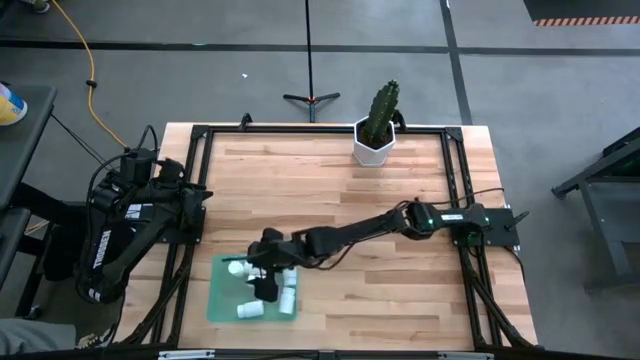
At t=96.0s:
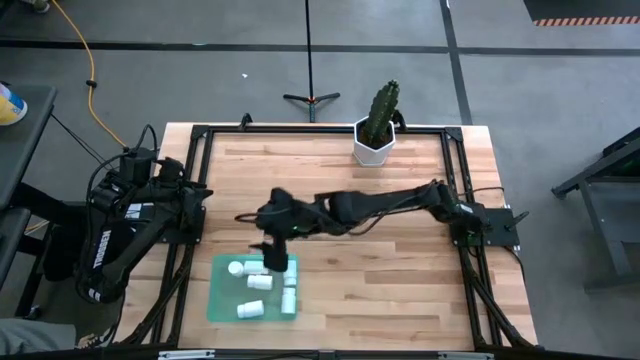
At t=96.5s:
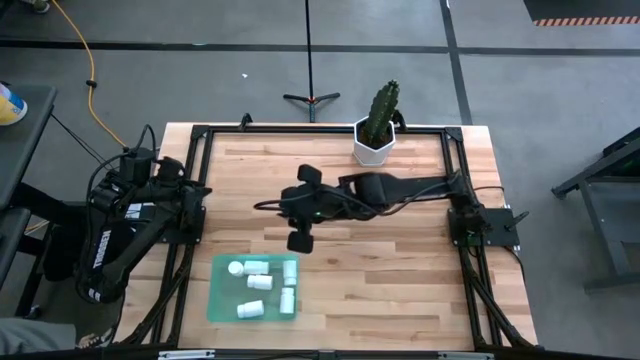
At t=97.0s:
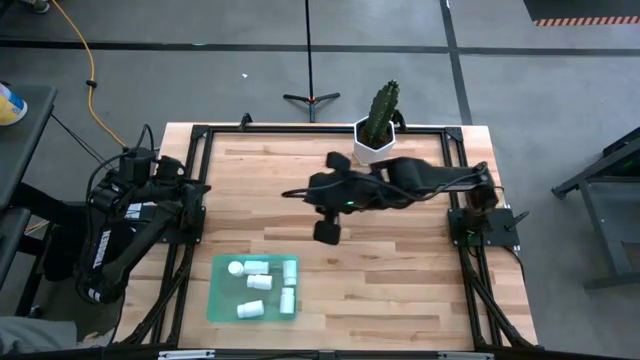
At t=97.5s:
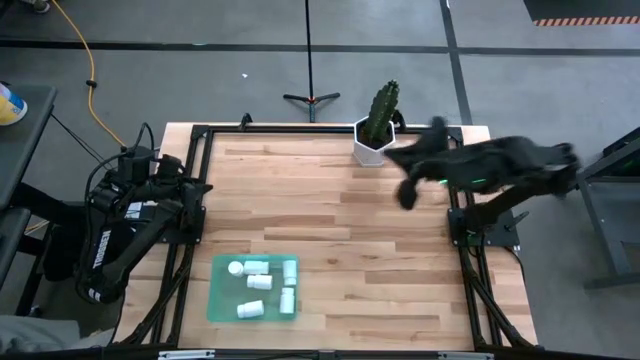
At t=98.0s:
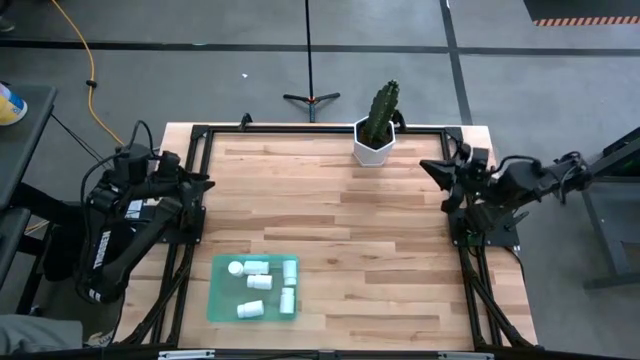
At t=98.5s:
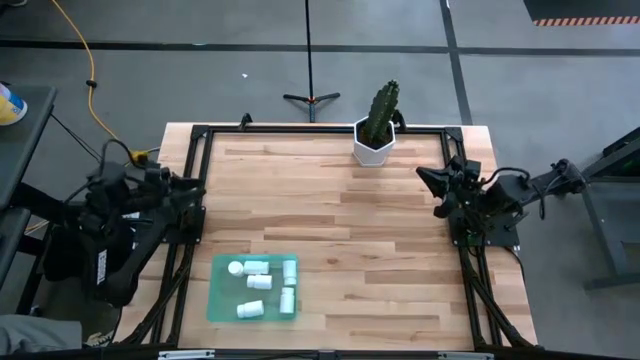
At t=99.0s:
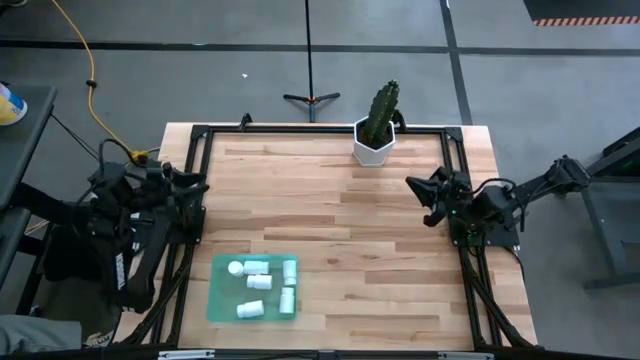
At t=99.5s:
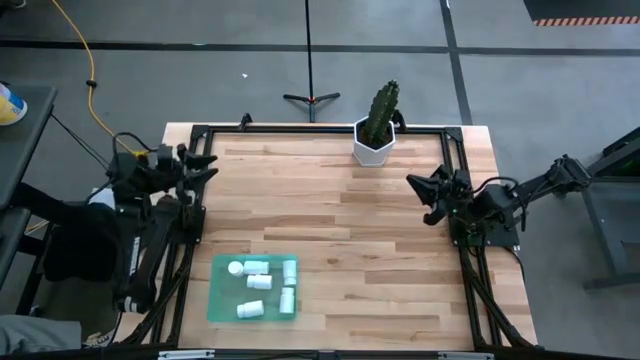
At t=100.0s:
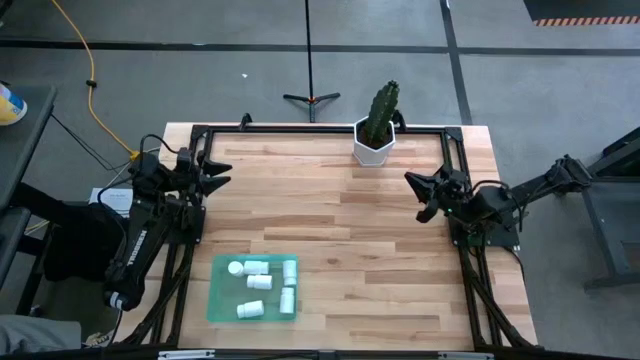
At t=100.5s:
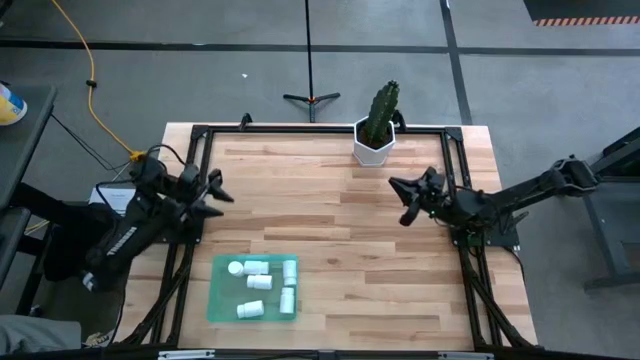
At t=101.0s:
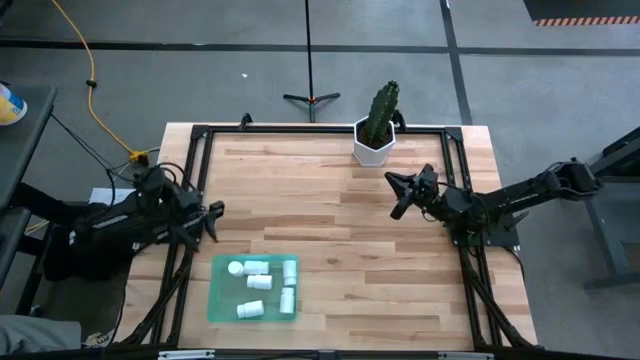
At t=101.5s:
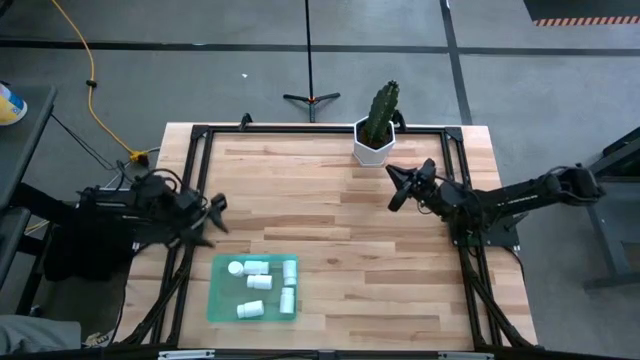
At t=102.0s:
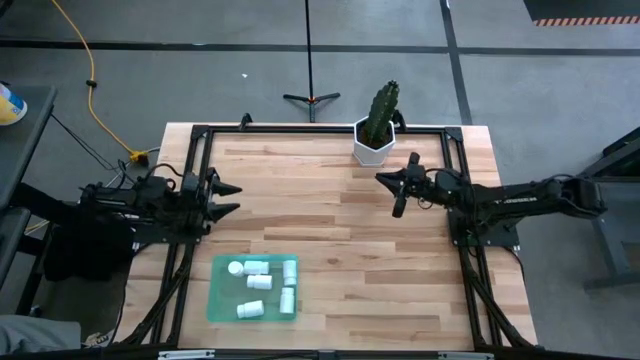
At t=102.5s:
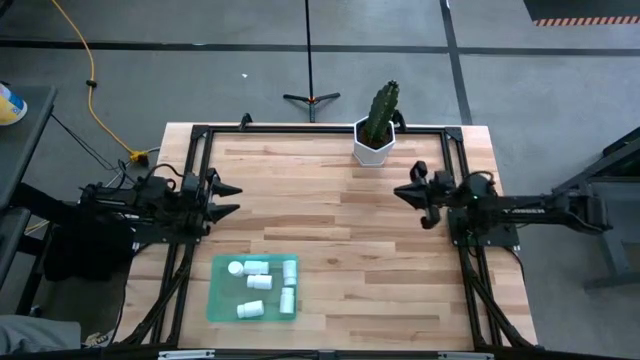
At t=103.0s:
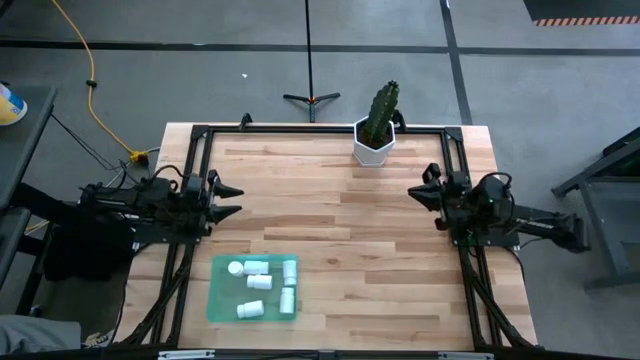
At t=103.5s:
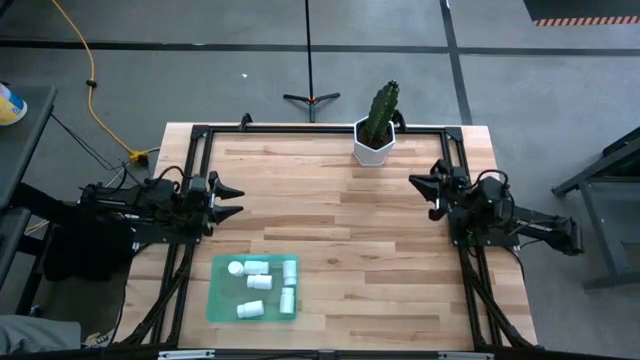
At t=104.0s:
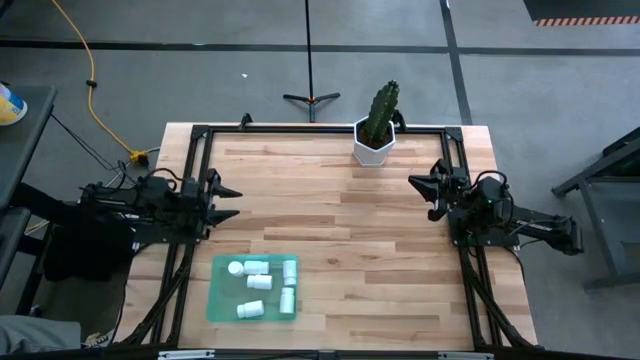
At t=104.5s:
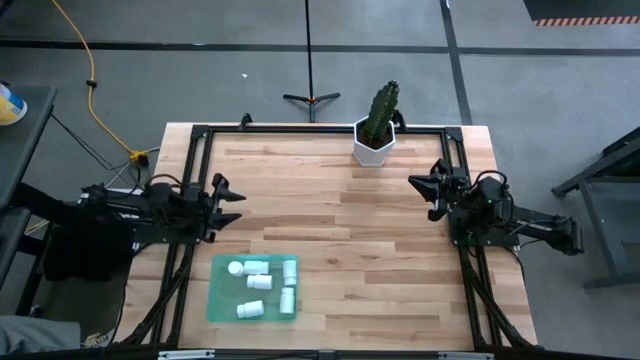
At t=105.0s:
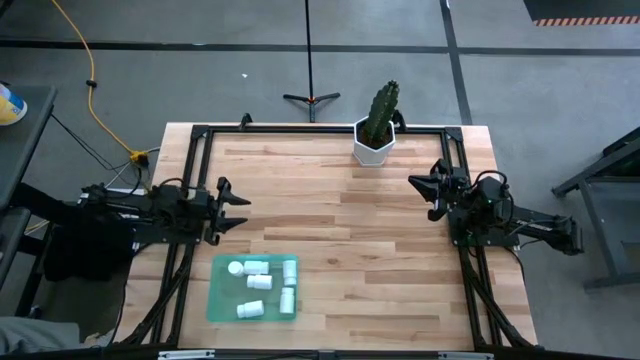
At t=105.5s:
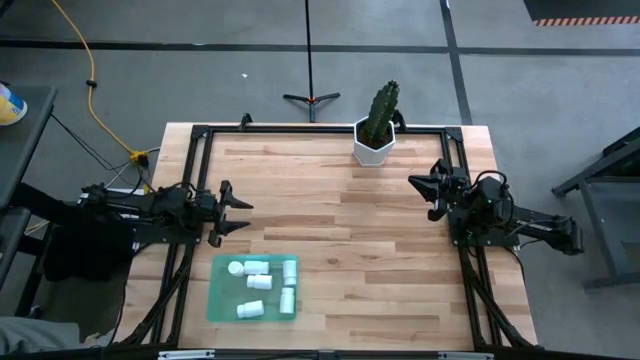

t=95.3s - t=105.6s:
Task: Pick and place pill bottles into a basket
Return to Home Position

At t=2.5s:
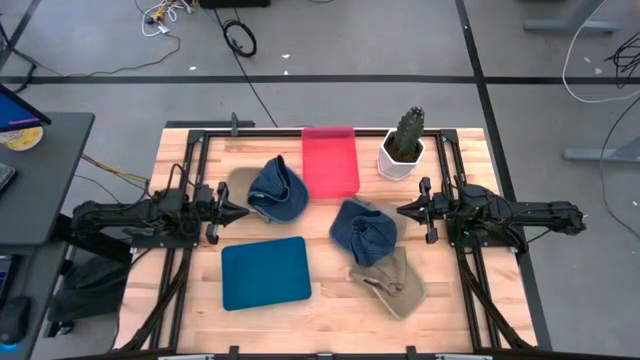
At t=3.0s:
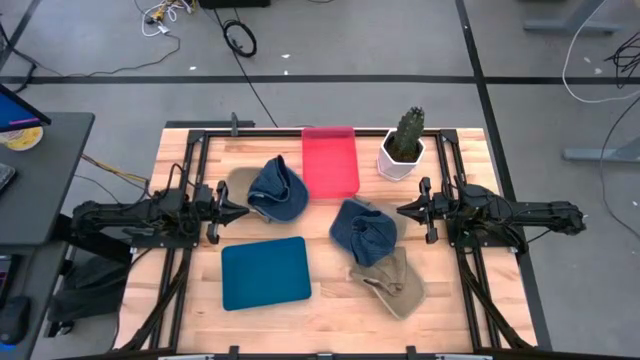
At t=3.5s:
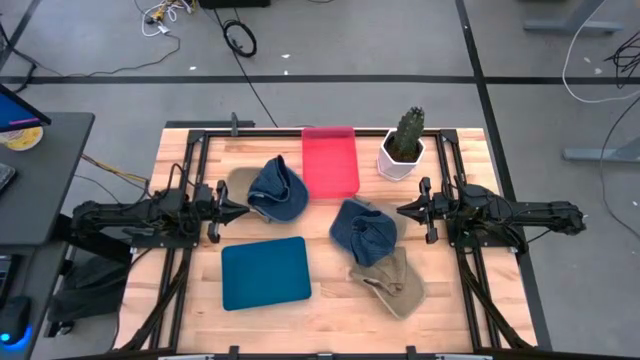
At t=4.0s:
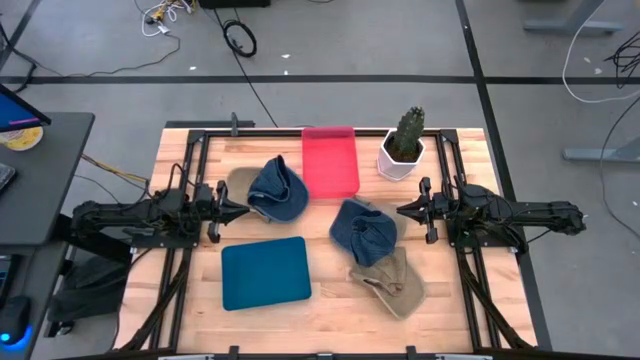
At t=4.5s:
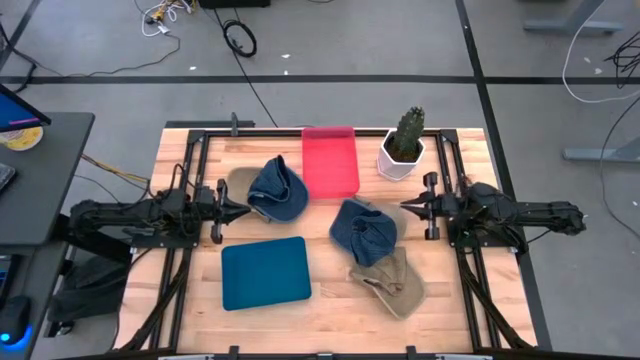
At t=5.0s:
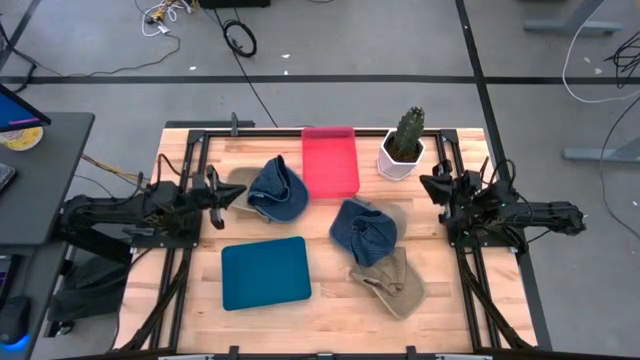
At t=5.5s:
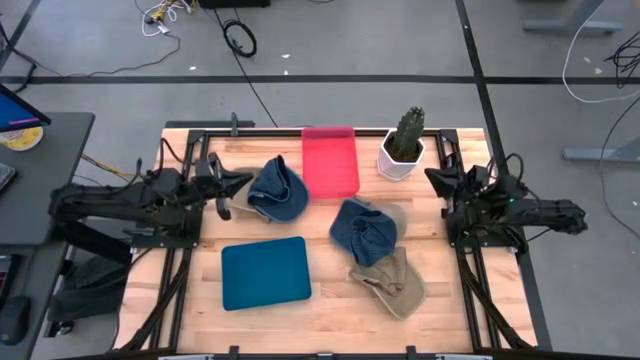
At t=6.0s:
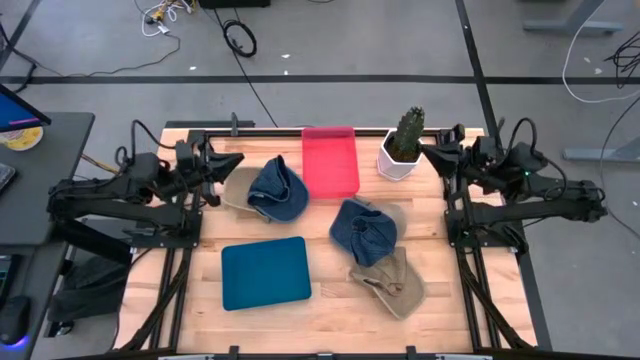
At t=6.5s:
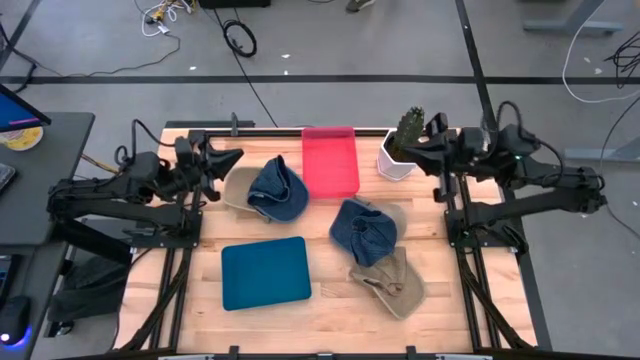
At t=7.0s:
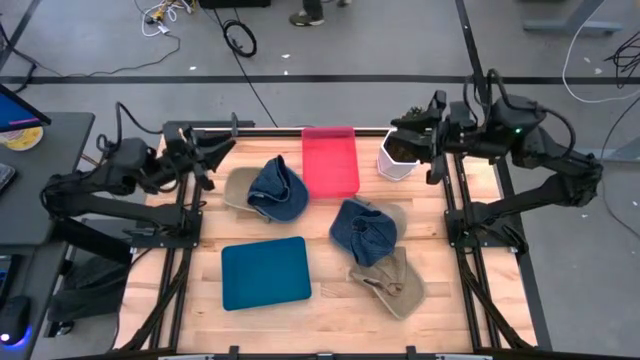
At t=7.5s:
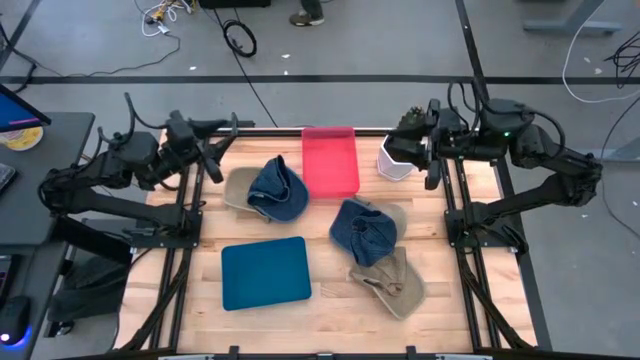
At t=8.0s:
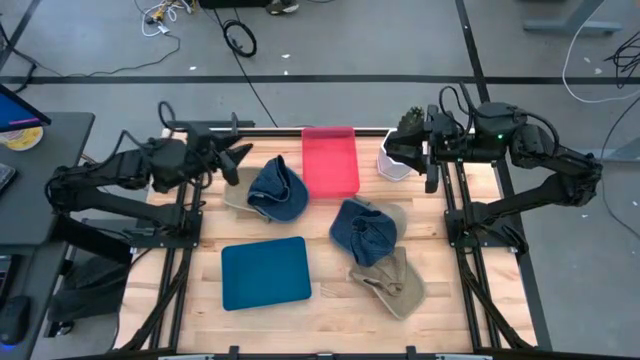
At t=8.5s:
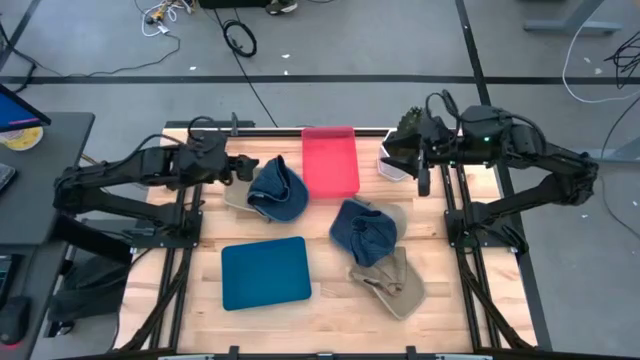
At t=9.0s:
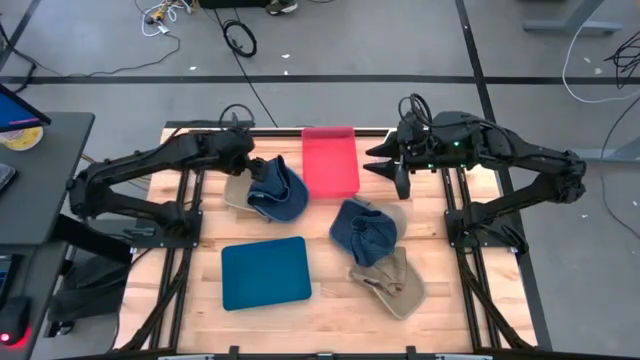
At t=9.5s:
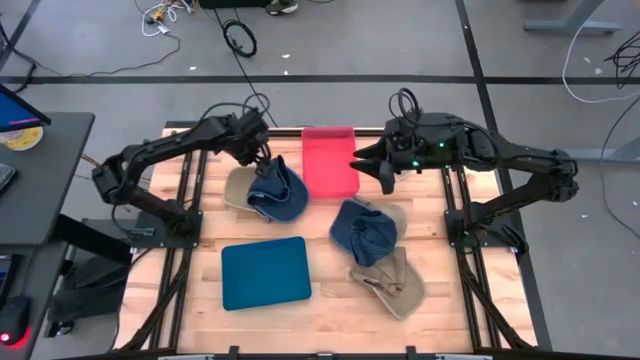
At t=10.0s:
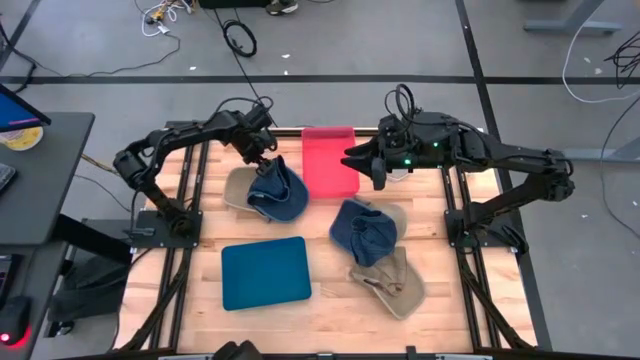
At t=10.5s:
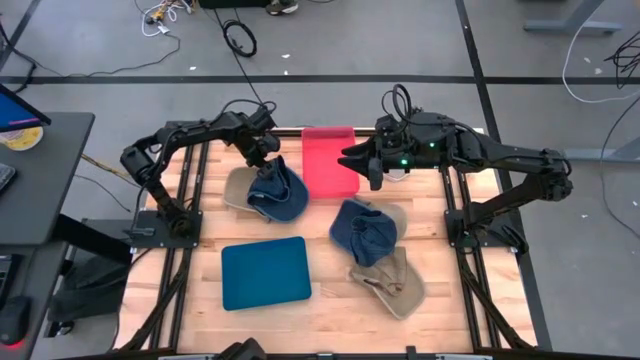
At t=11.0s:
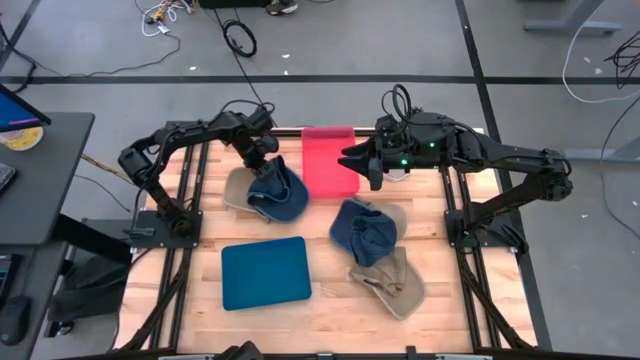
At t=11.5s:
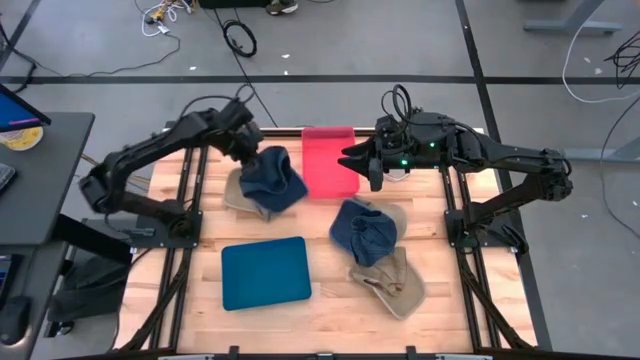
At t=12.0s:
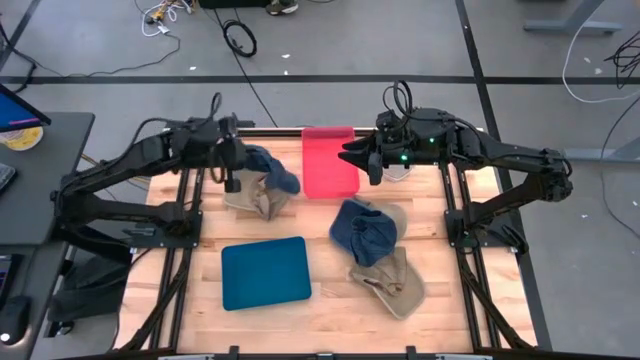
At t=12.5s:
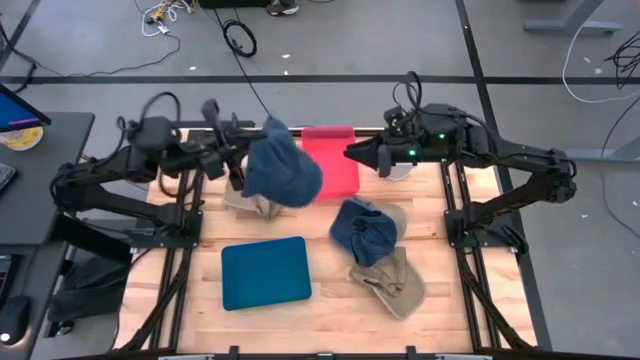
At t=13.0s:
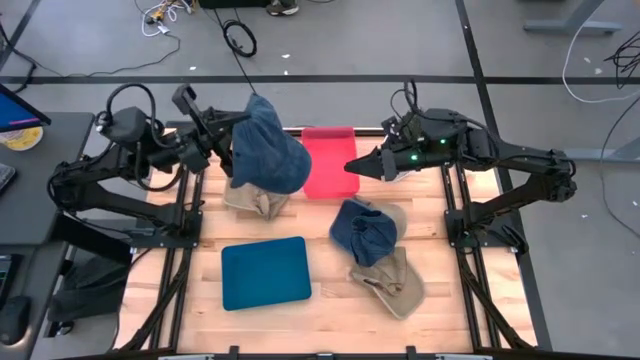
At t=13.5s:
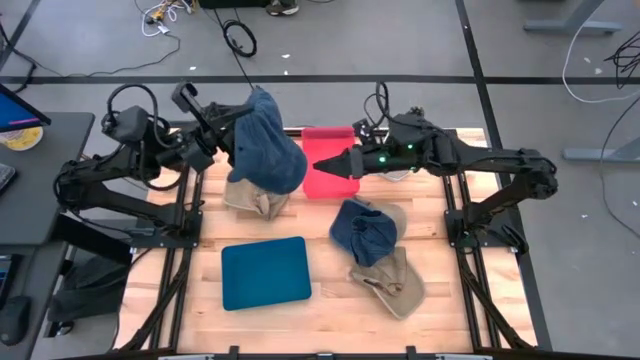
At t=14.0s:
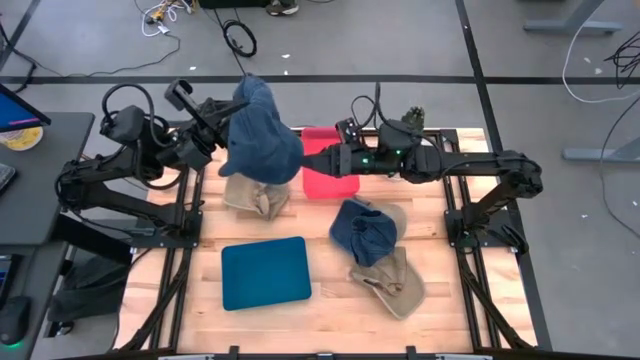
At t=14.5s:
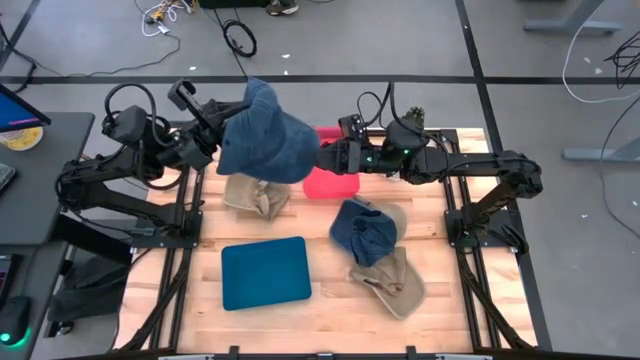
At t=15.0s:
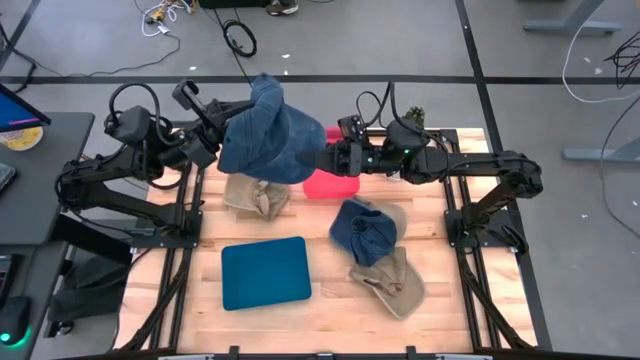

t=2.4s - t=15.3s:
Task: Pick & Place hat
Put the top blue cap into the pink bin
